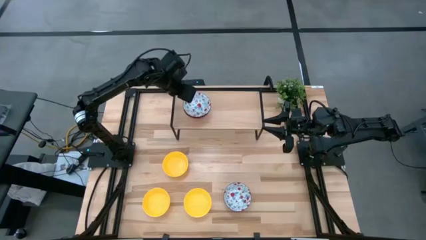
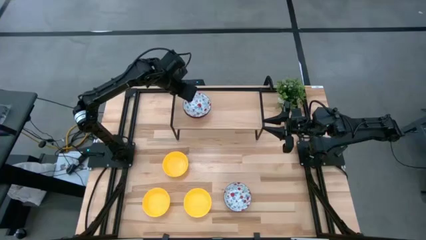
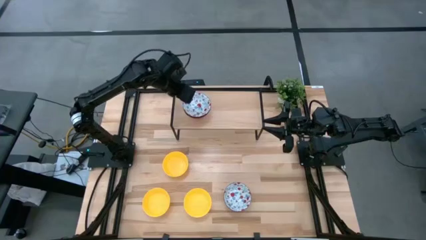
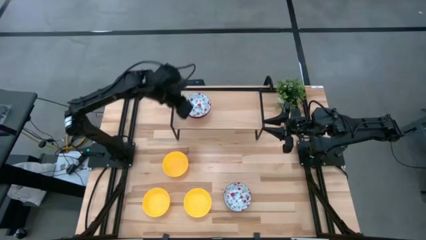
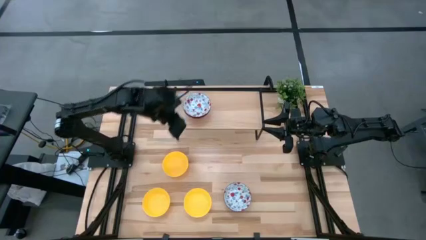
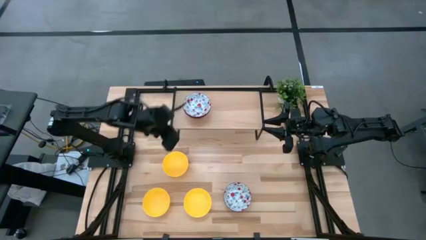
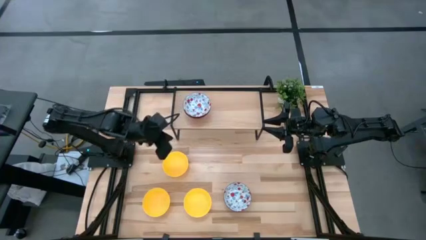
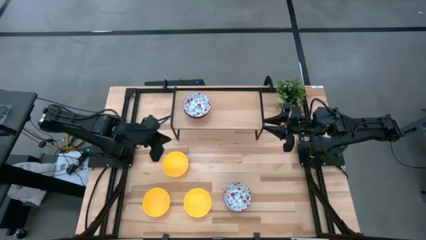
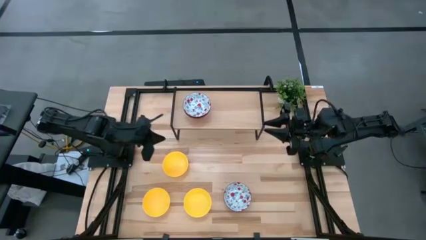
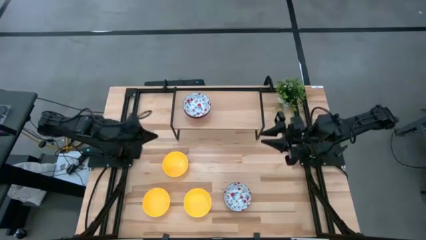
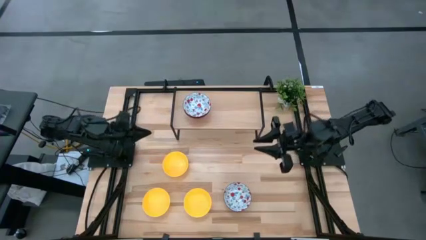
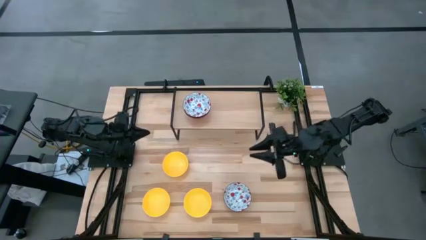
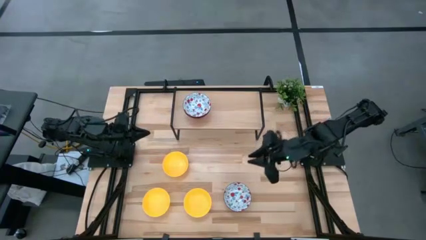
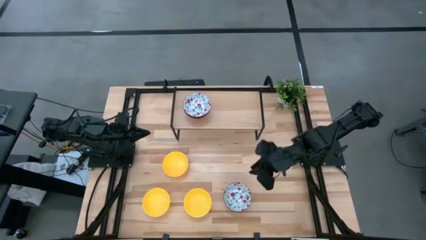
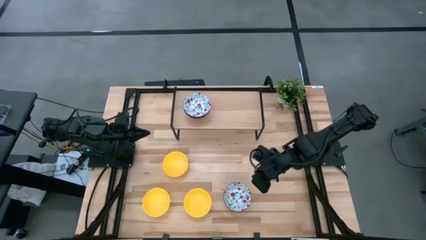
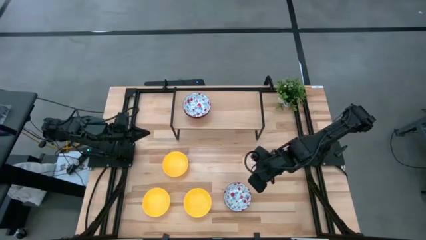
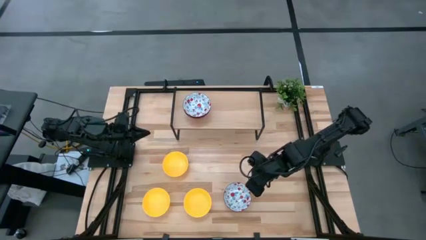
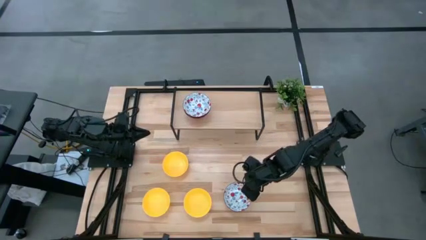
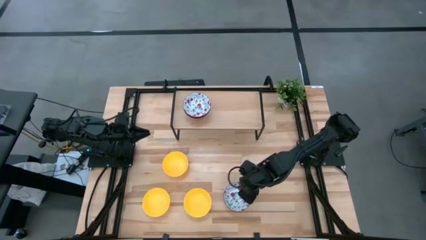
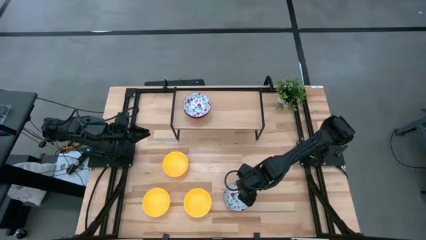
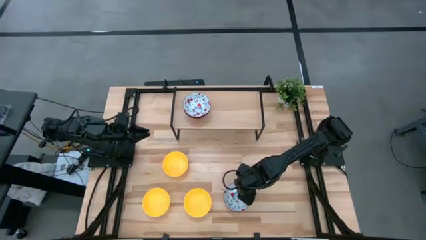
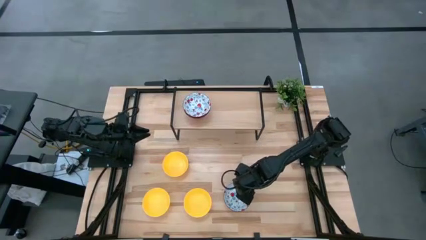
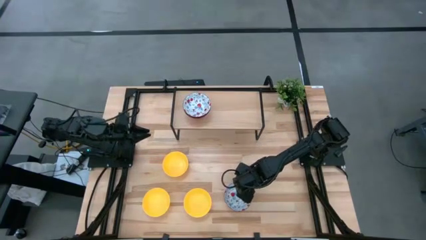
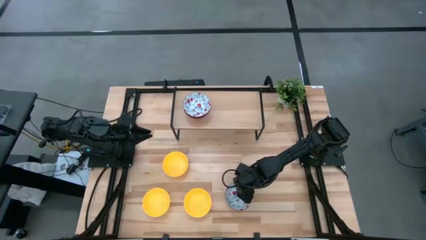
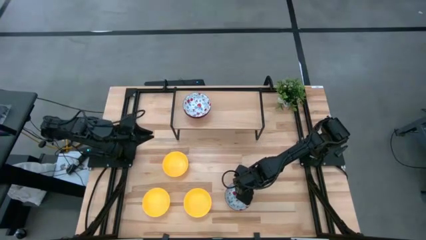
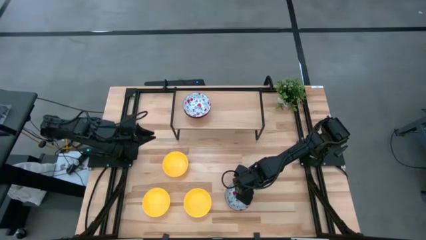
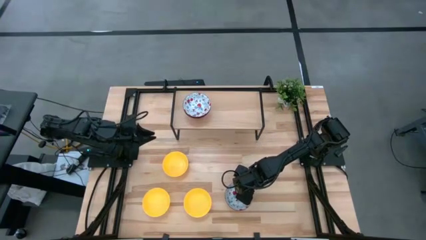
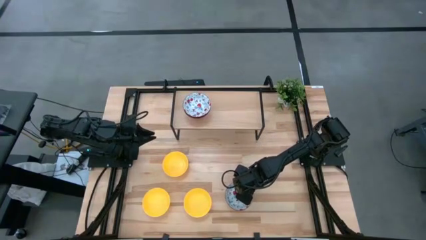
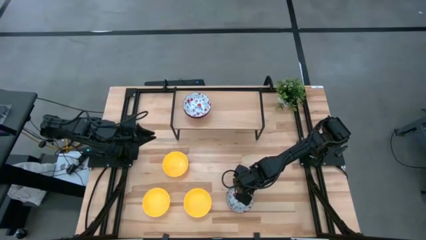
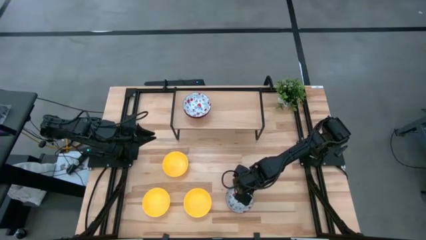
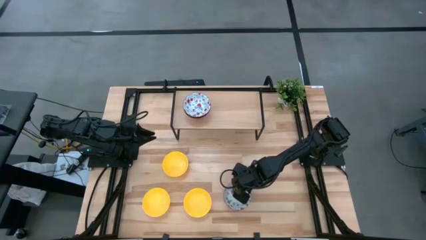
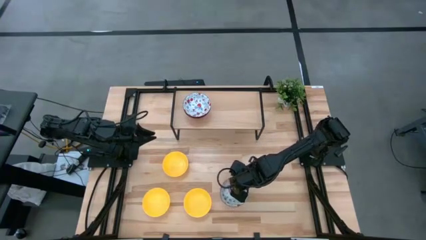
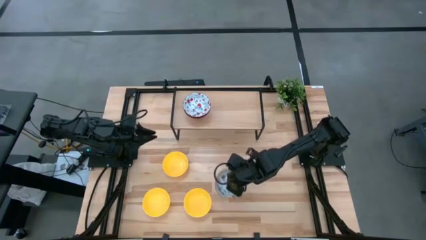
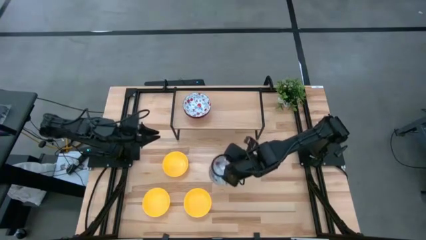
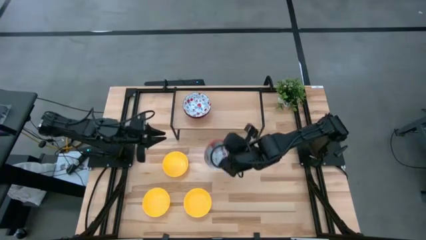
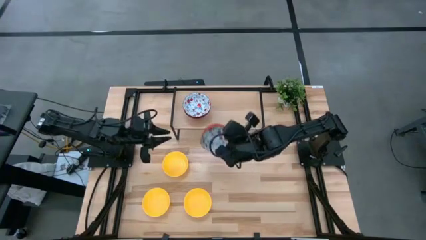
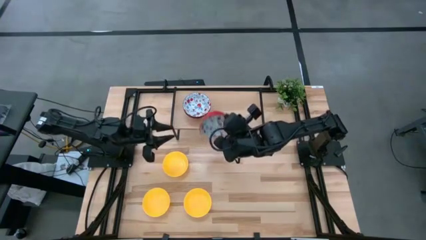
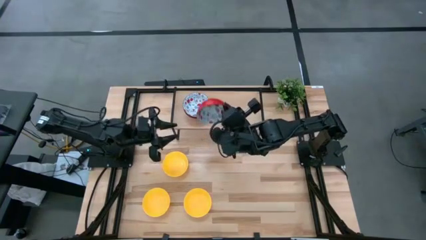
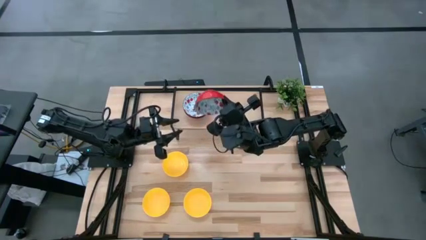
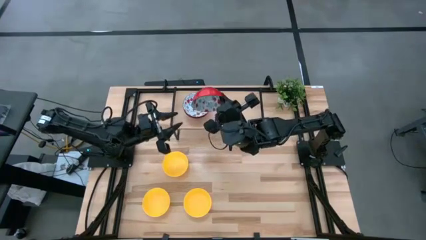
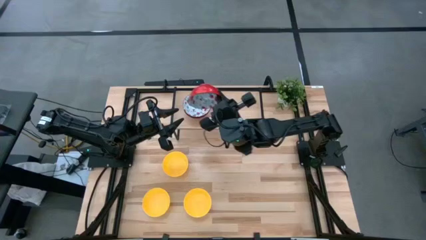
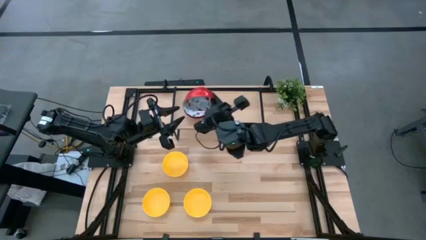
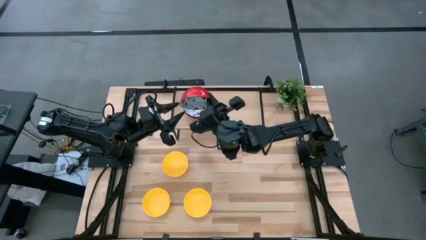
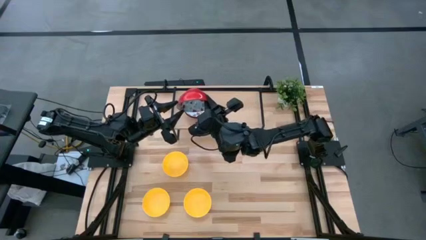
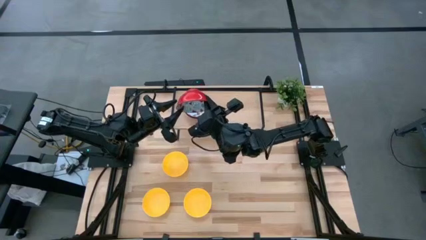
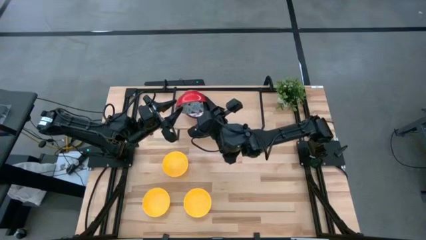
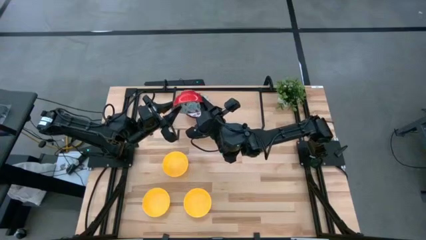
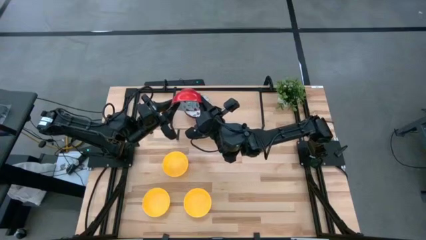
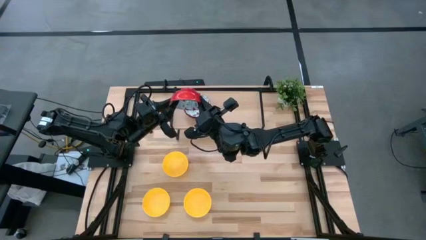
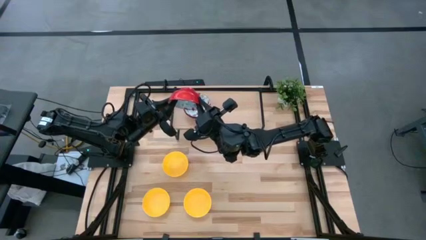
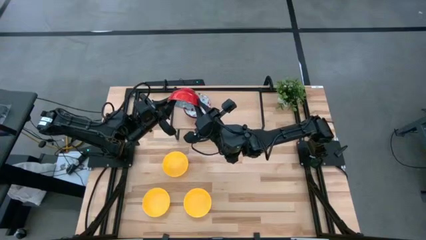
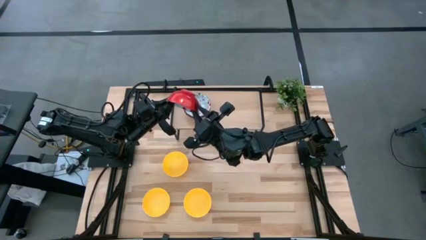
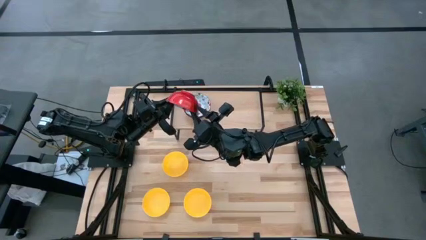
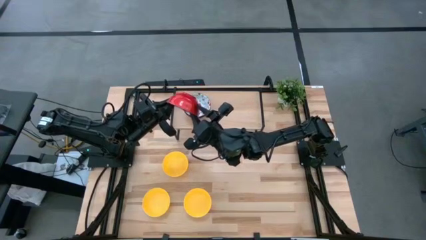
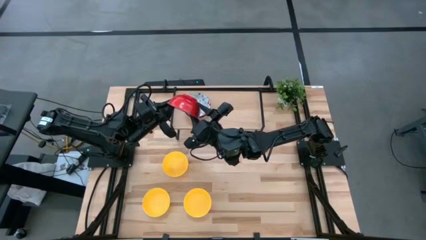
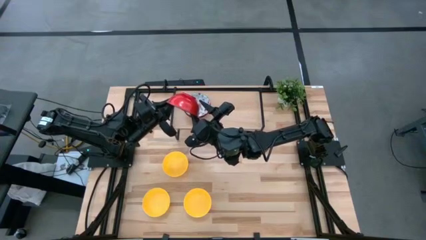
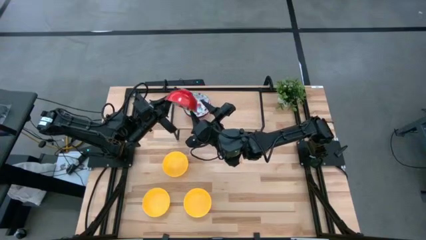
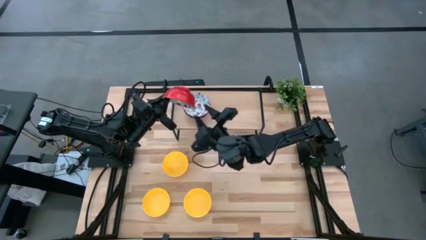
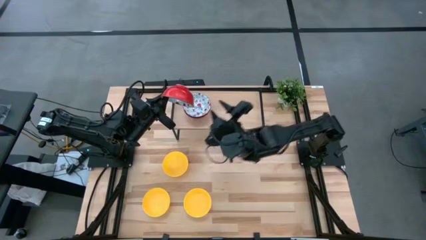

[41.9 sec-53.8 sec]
Task: Pick & Place Mini bowls
Stack the white patterned bowl on the white patterned bowl on the shelf
